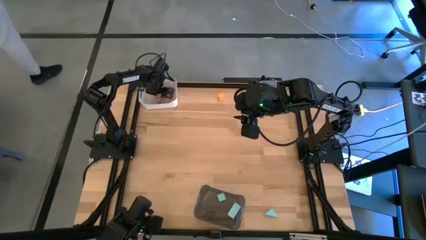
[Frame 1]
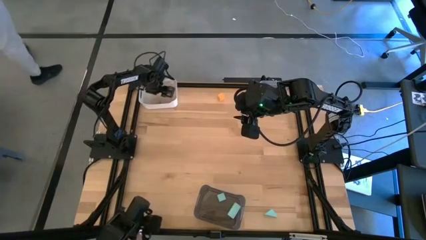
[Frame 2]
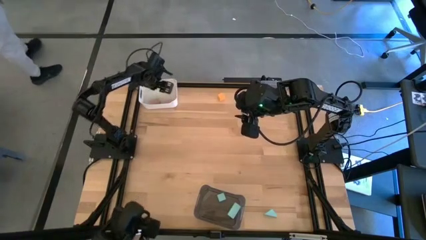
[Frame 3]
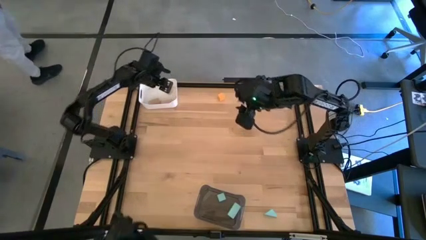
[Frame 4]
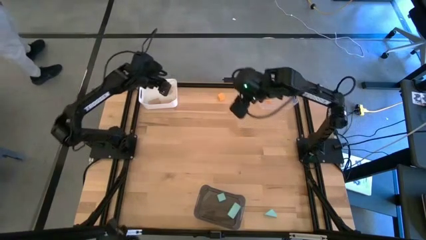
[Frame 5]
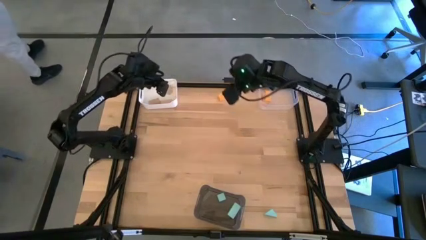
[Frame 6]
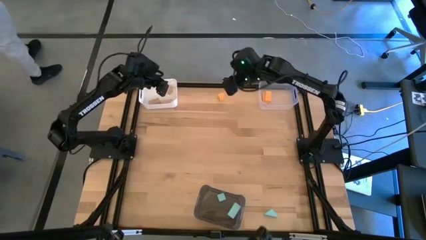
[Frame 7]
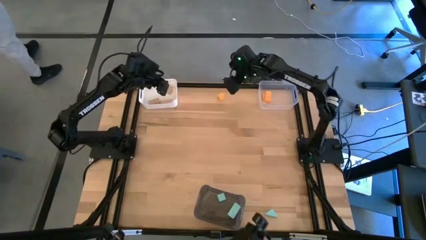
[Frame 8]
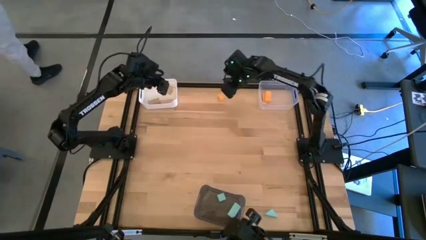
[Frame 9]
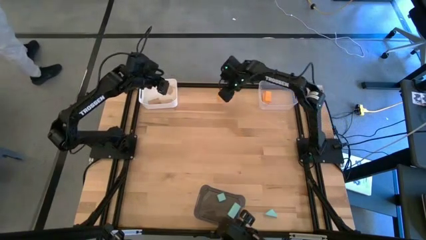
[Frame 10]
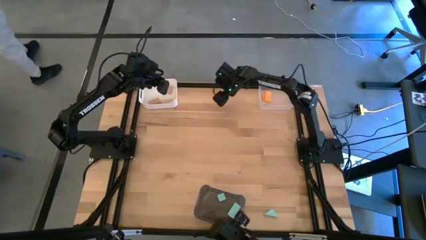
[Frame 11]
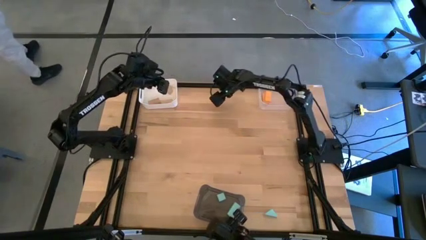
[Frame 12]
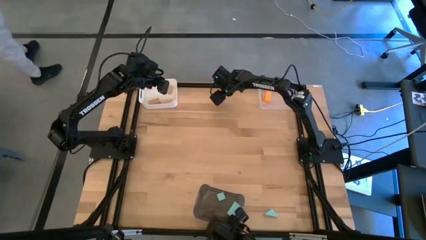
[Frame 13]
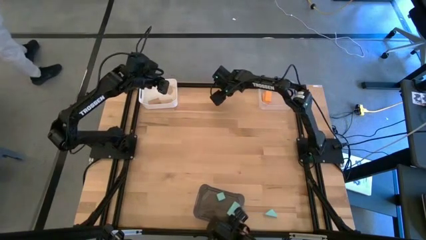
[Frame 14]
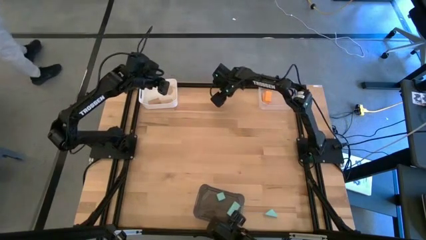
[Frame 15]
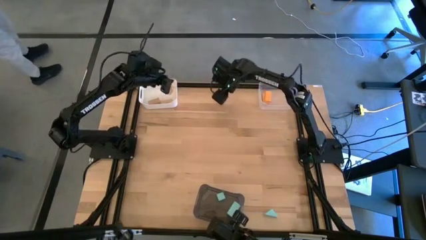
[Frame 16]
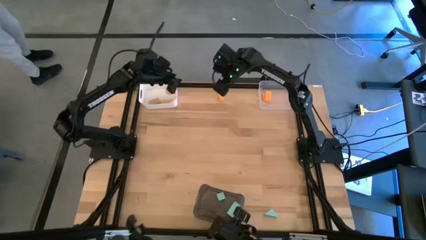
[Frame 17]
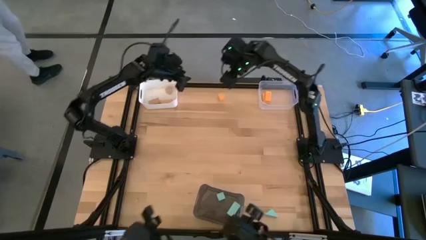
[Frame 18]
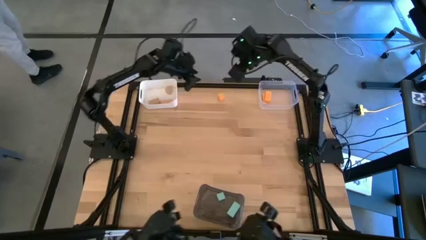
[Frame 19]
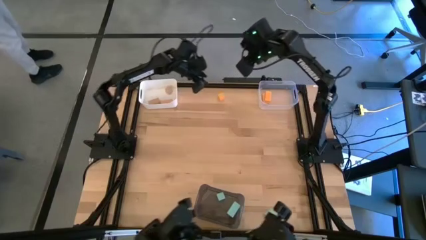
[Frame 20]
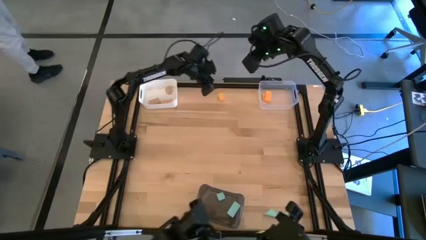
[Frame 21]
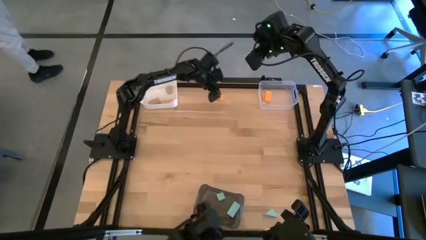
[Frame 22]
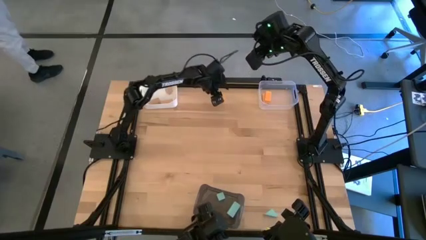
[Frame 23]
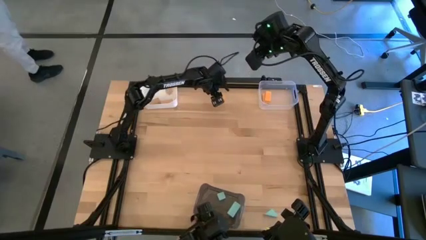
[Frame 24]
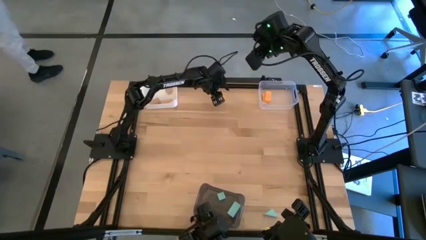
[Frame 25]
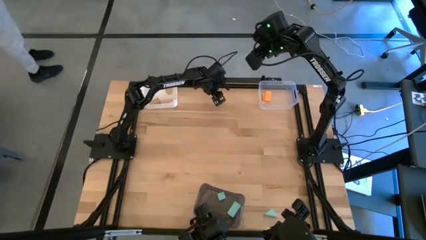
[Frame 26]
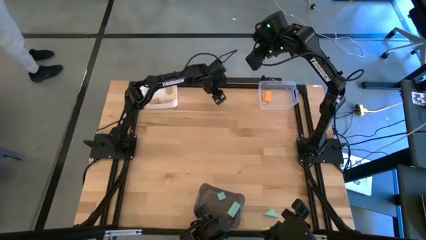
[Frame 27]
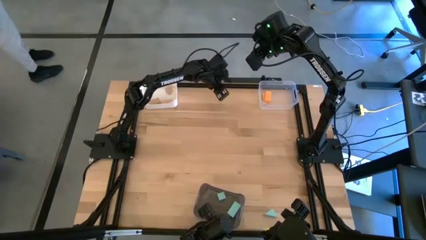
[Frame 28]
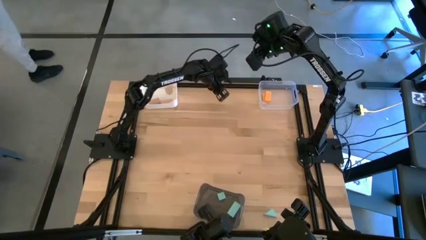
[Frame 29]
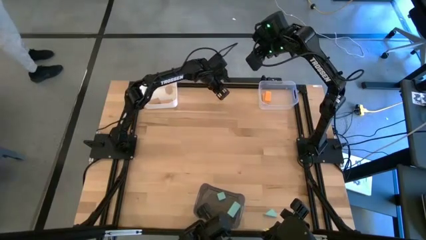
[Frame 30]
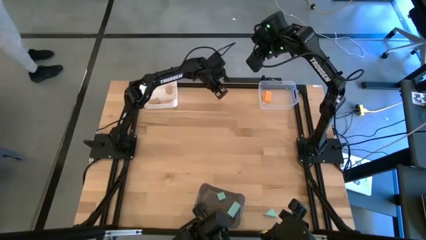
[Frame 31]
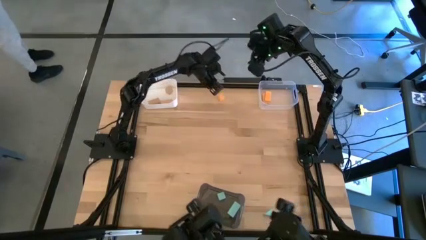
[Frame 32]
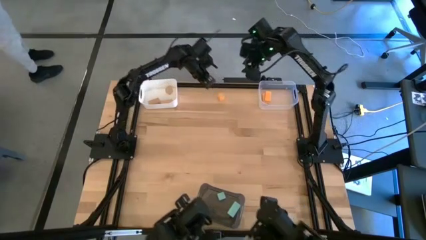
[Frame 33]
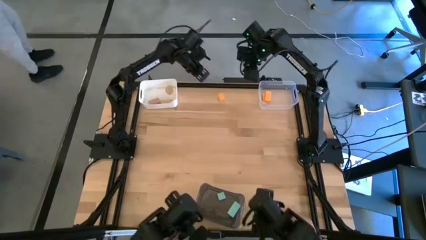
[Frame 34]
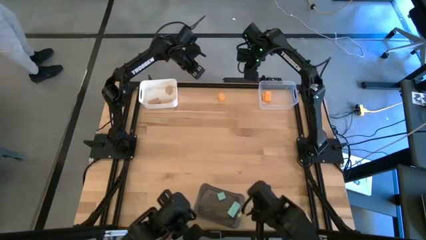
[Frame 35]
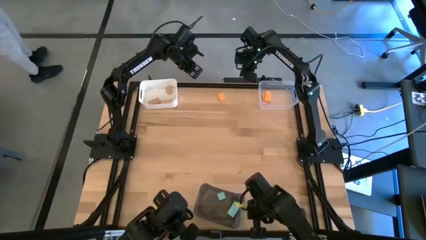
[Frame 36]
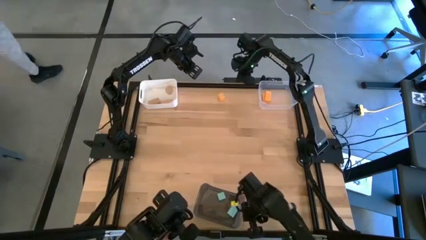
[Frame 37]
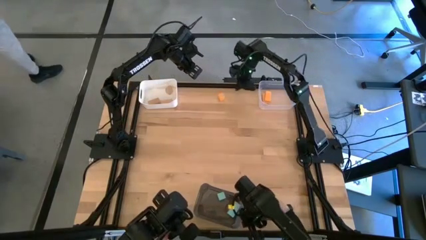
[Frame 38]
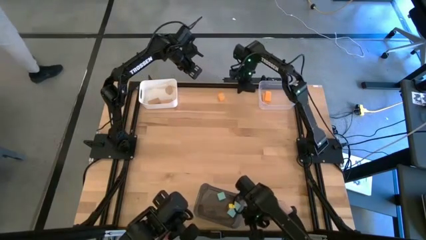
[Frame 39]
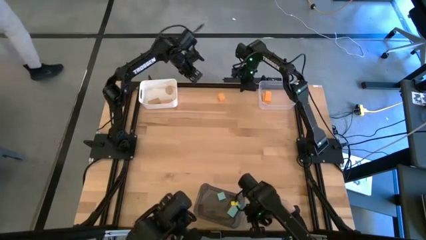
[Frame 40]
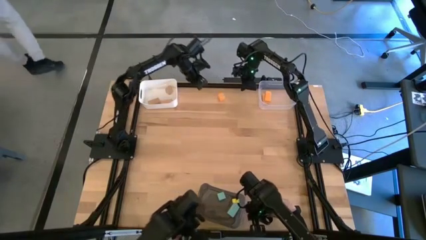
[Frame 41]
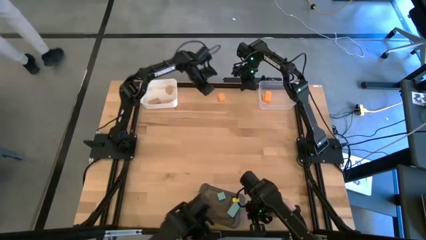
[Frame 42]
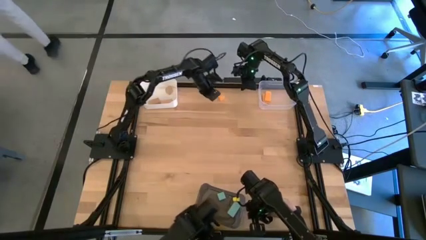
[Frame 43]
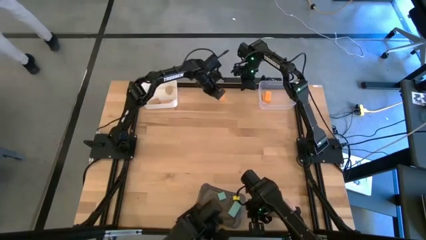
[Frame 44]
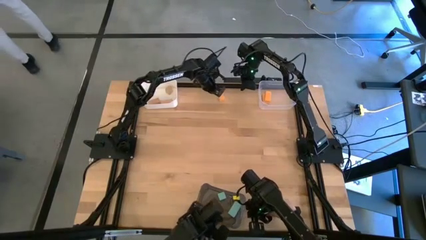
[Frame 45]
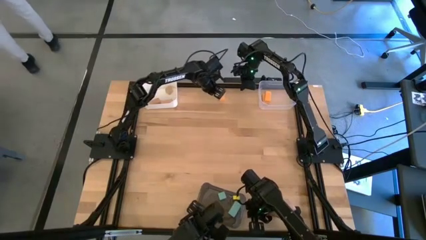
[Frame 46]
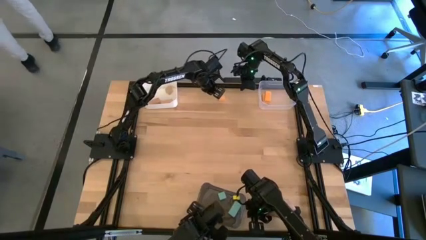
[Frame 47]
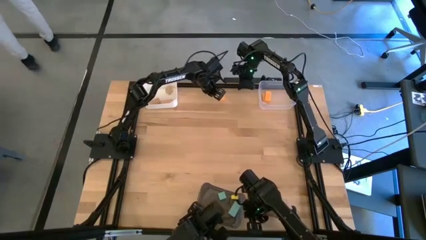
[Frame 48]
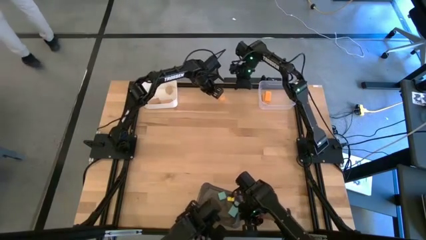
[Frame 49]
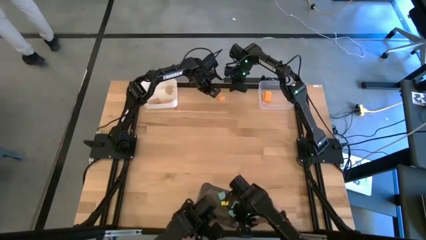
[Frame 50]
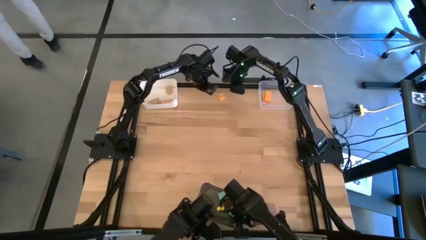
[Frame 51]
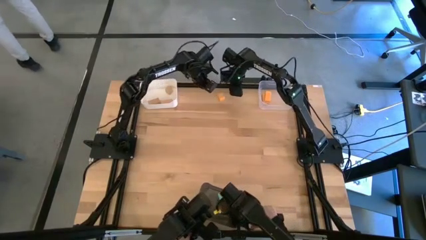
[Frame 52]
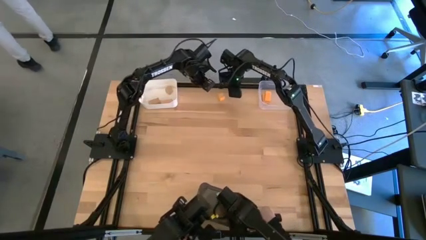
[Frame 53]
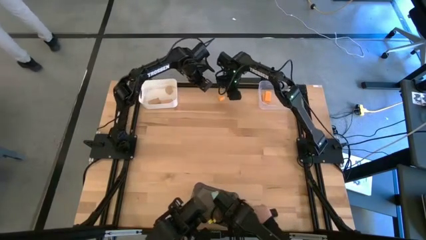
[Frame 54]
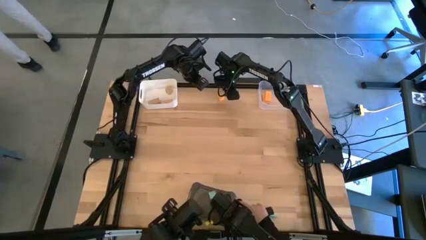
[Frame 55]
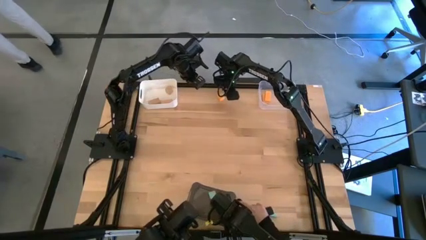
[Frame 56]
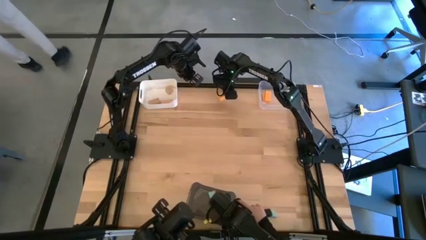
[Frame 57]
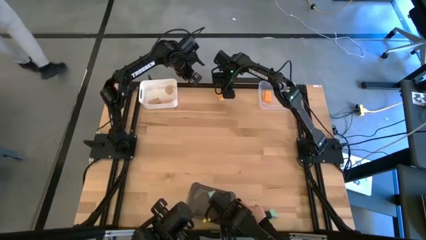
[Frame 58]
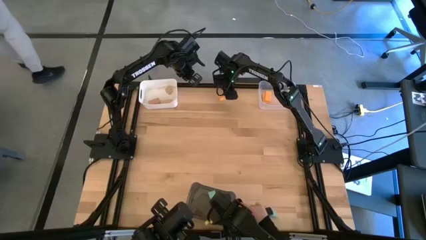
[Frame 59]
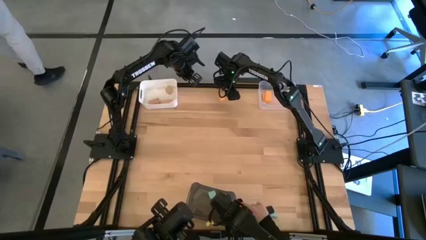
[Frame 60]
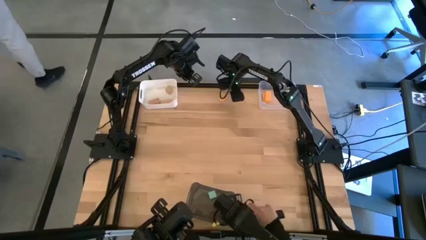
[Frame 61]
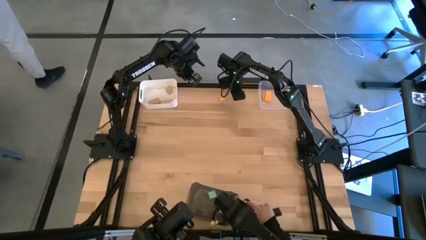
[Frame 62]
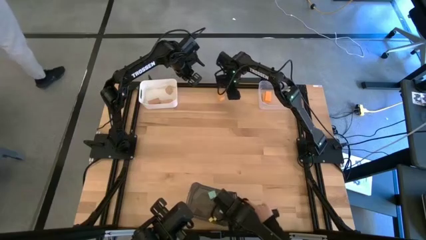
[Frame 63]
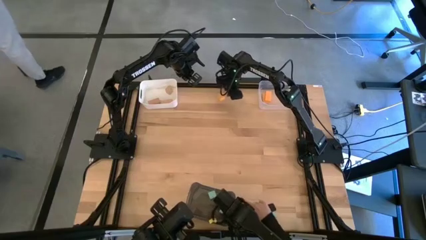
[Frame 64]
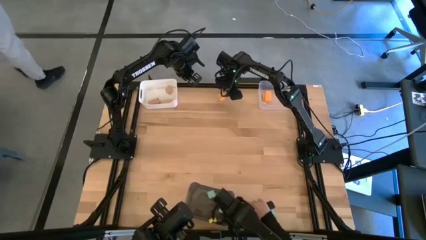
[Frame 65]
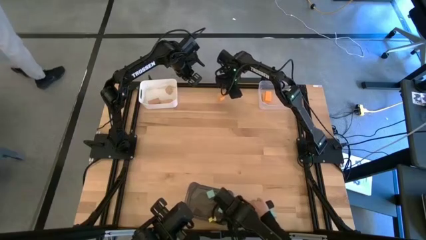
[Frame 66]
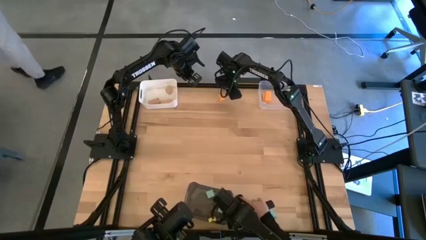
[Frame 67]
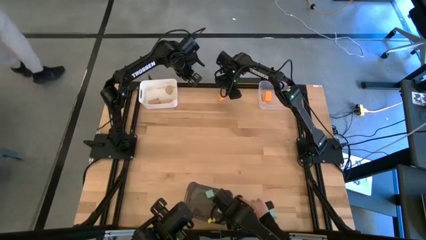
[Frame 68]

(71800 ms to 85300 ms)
Task: Sort & place blocks by color
Put the yellow block into the transparent bin
